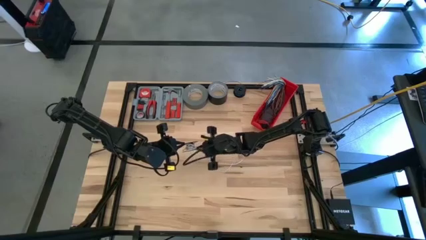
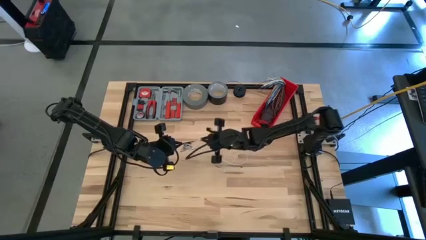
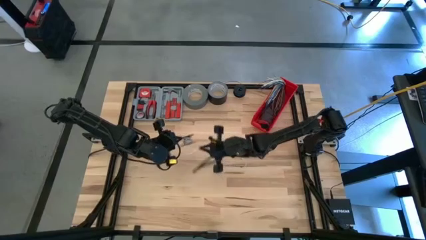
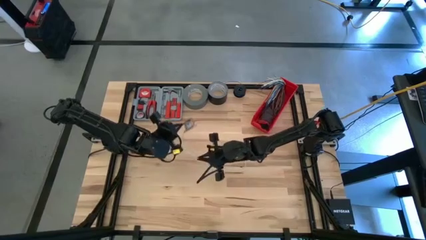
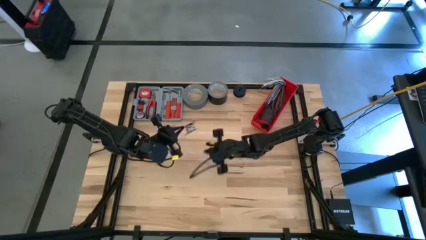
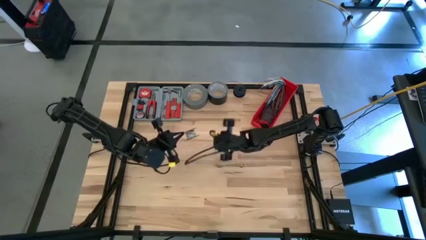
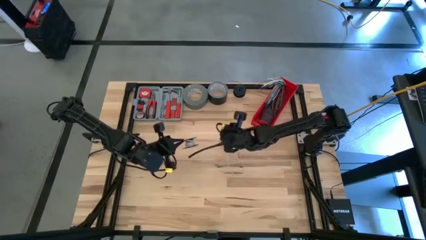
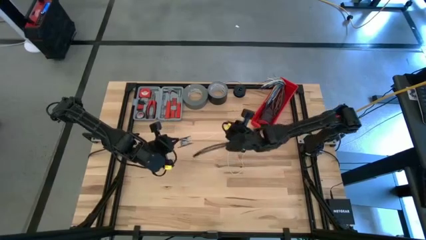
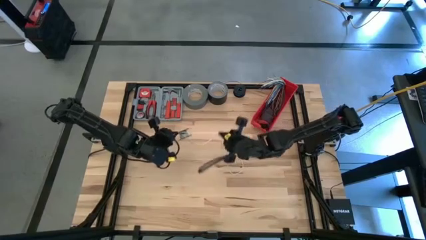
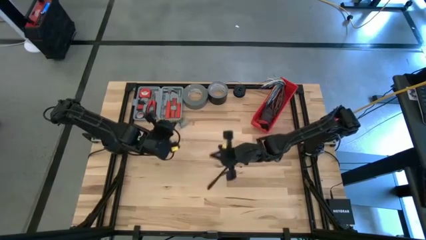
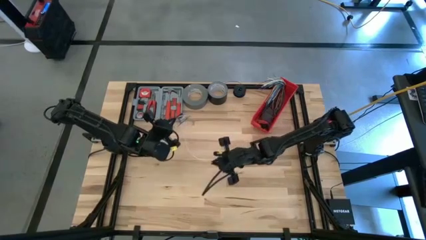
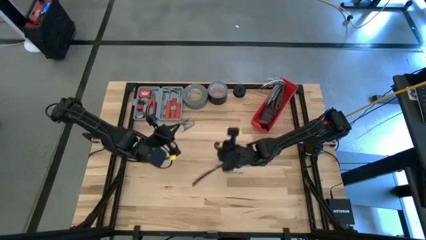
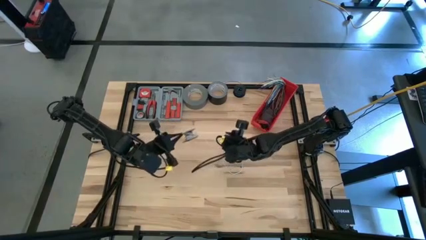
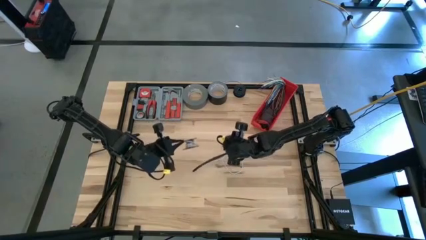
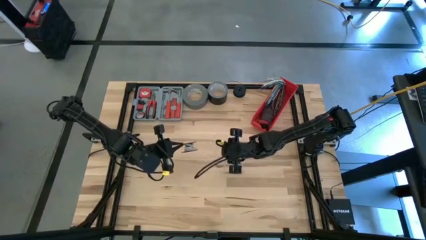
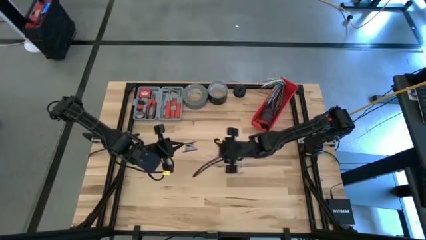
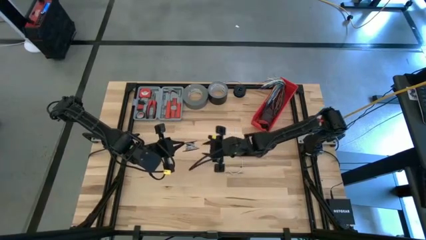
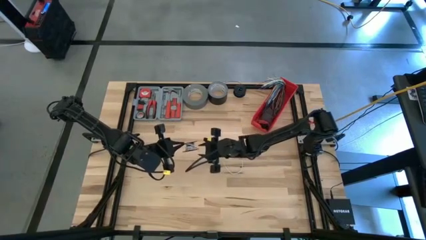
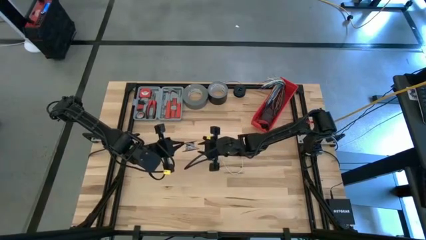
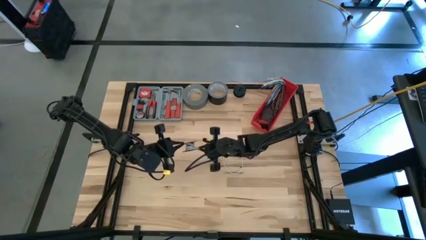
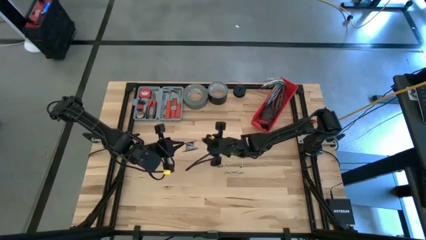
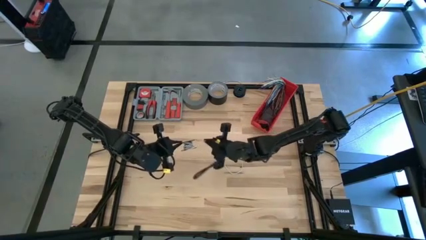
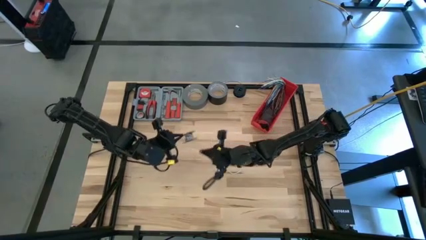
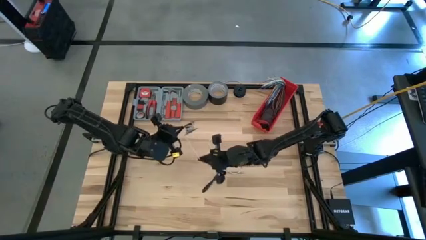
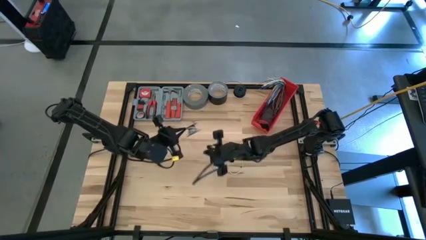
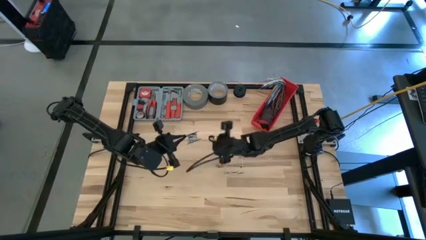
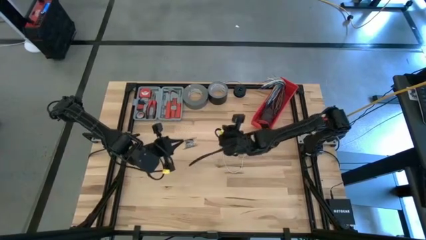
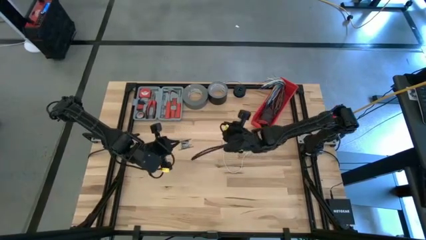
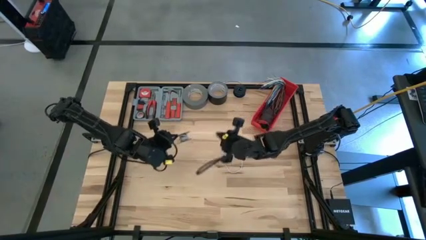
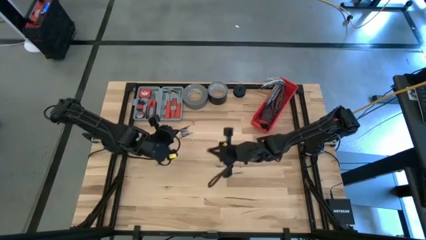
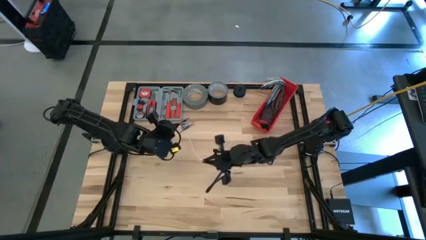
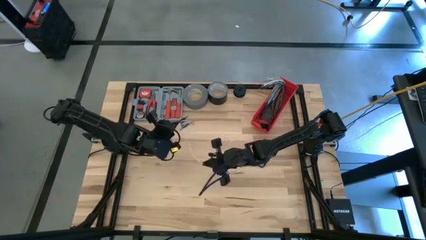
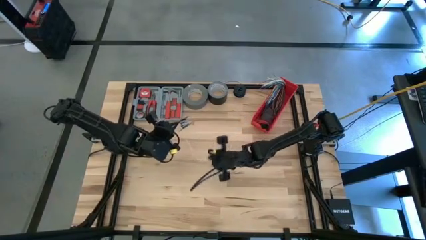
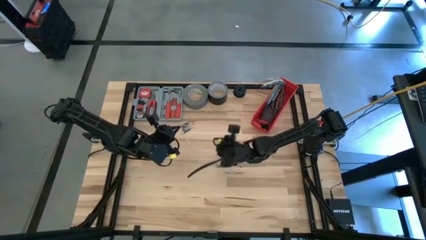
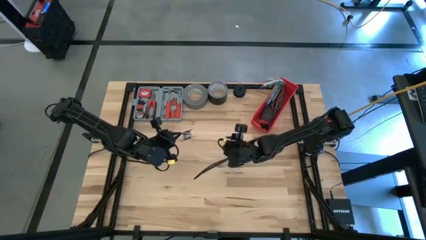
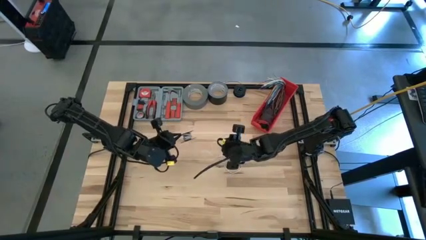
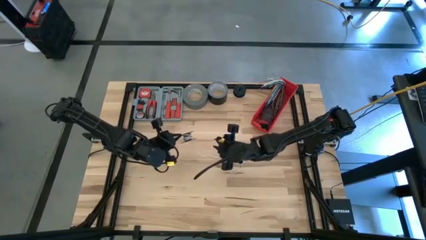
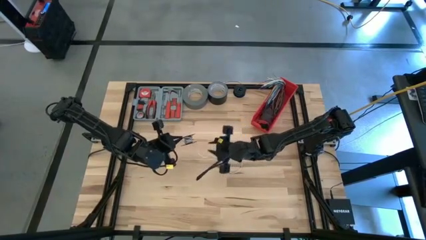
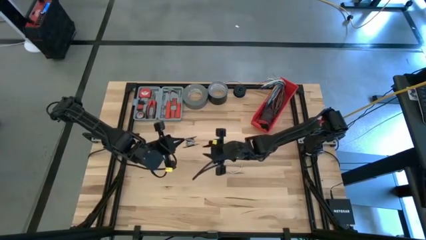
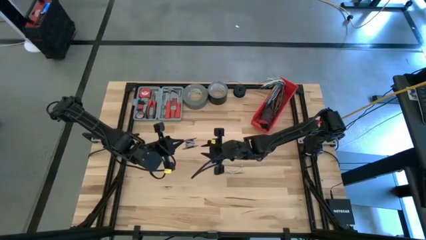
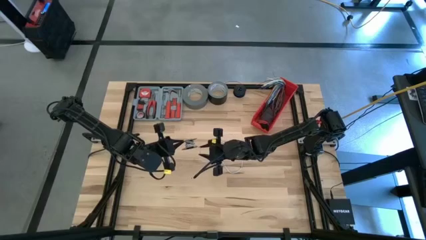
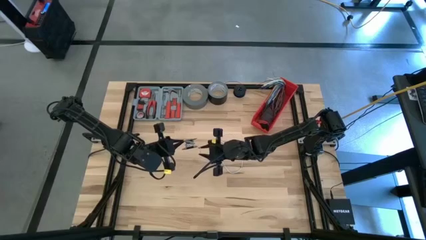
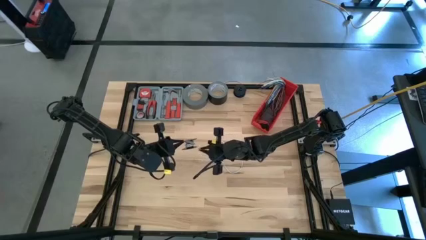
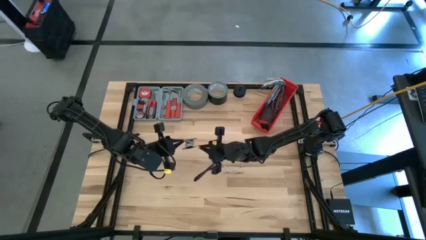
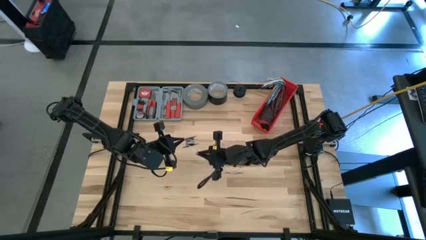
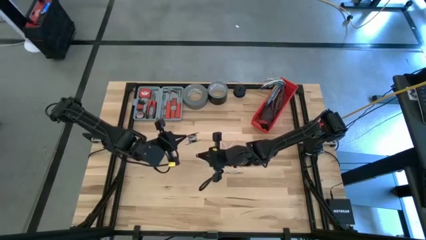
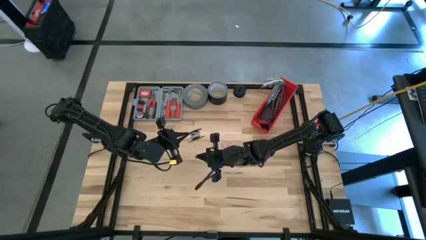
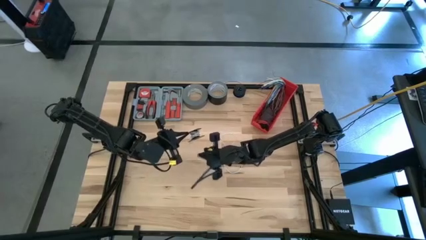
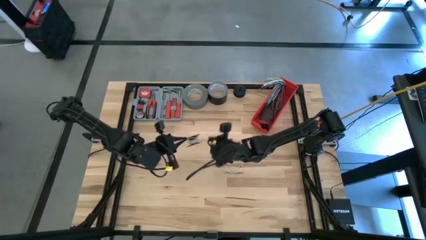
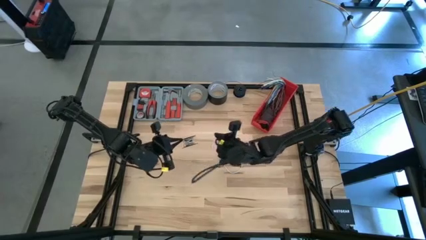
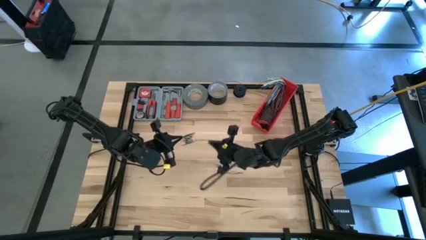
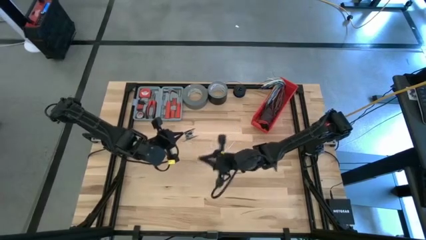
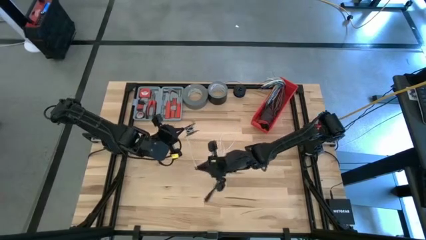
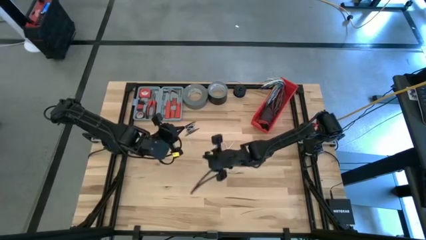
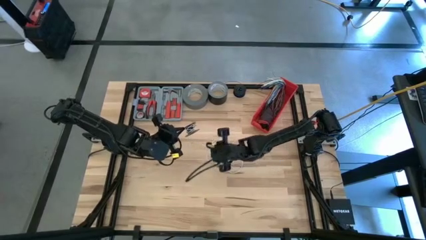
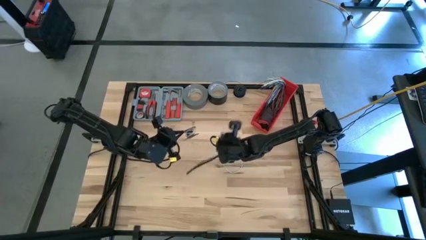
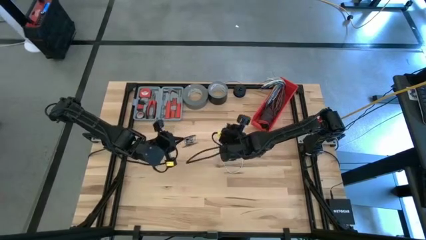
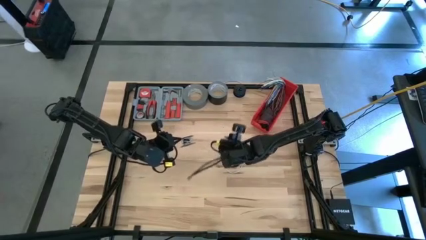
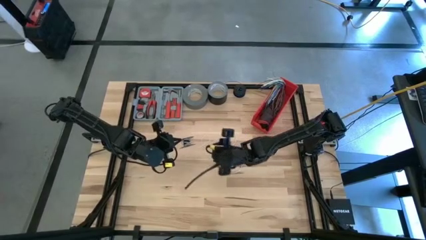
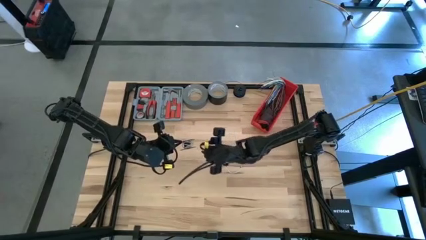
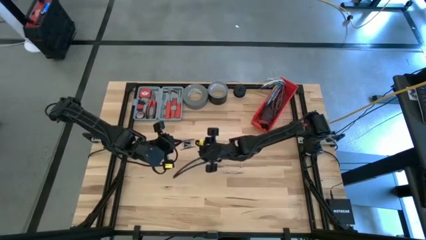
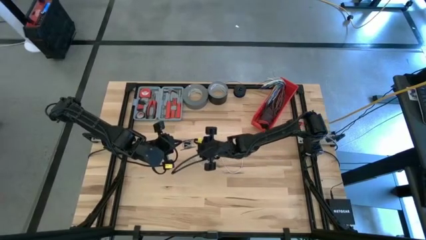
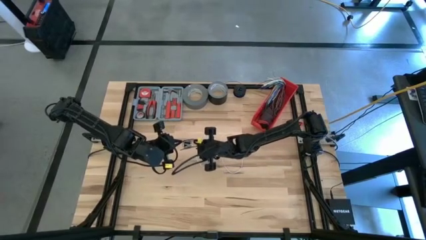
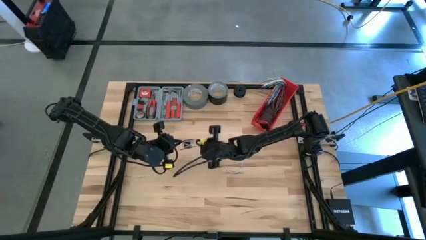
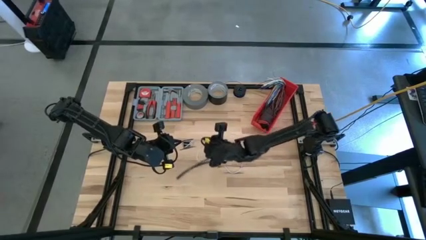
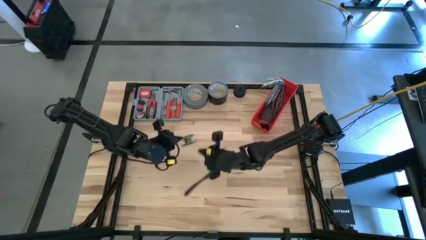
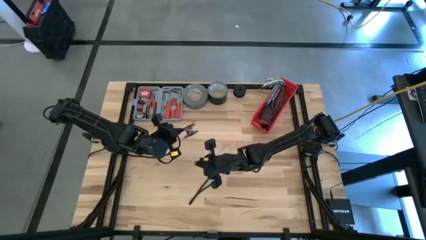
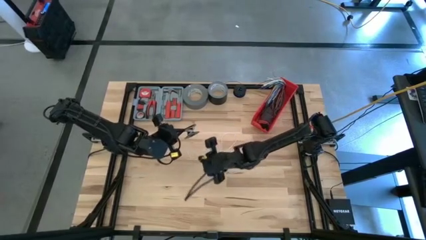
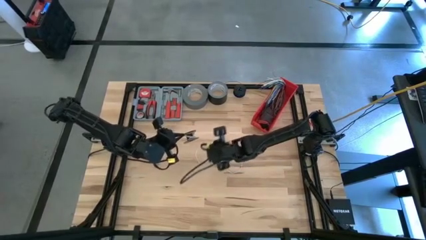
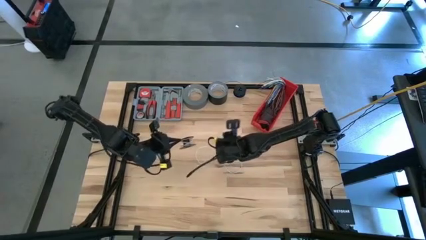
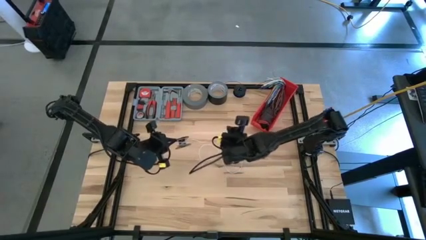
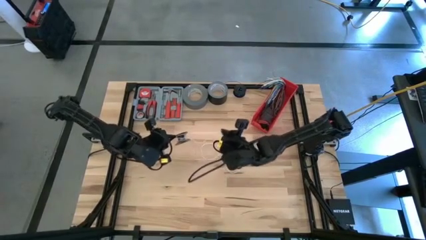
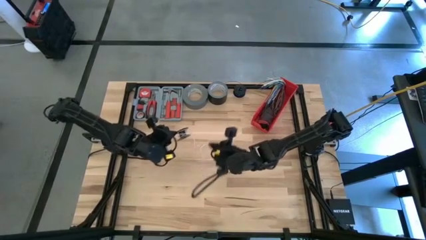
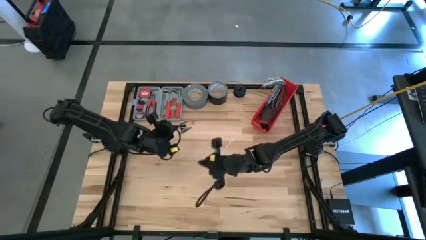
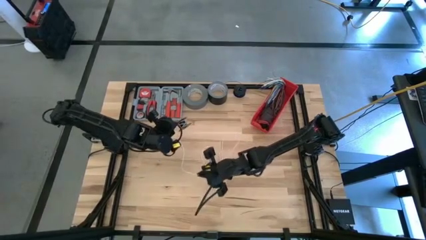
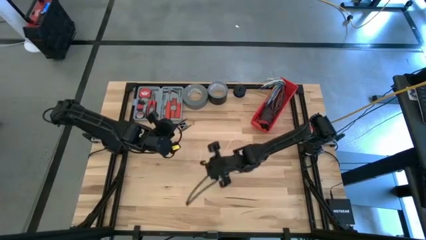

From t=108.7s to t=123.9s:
Task: Coil cords
Uncoil the white wire from the spool
